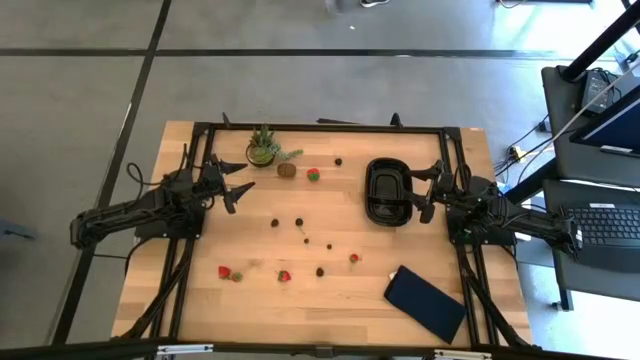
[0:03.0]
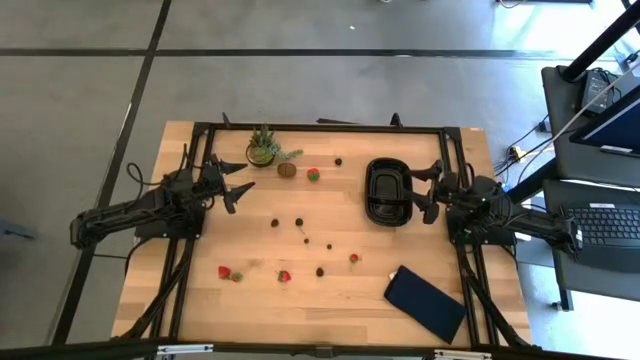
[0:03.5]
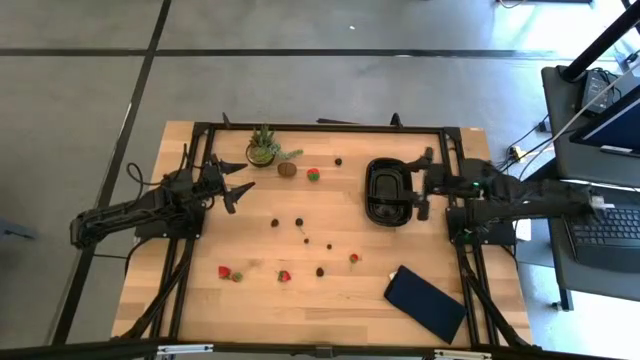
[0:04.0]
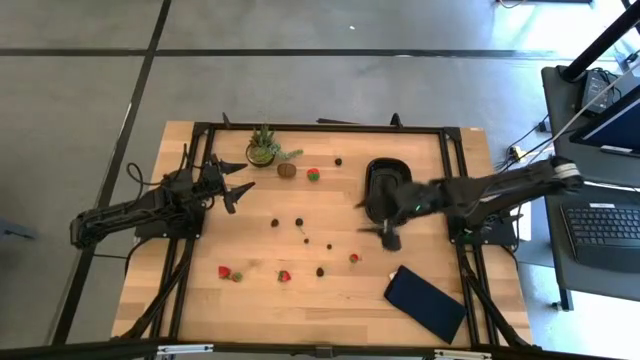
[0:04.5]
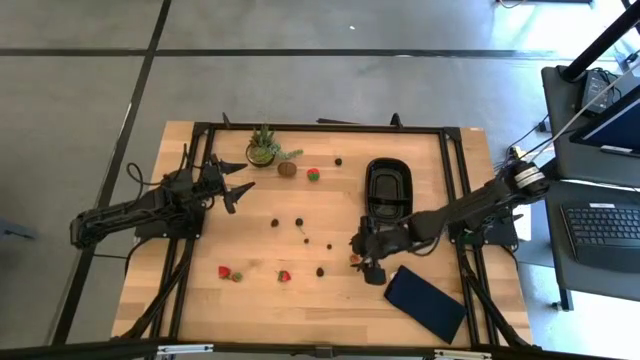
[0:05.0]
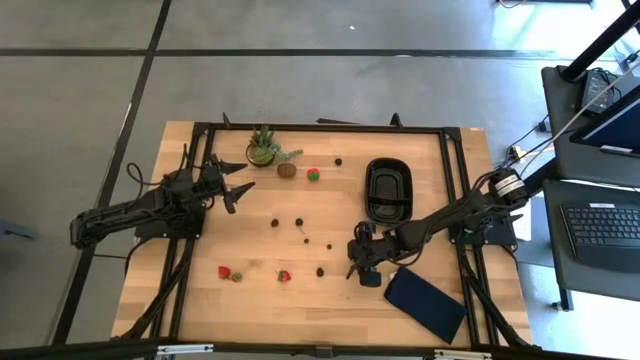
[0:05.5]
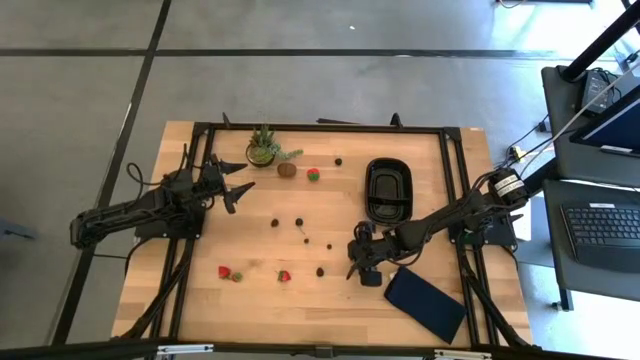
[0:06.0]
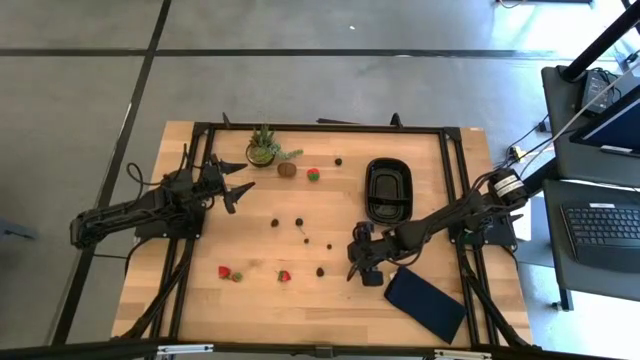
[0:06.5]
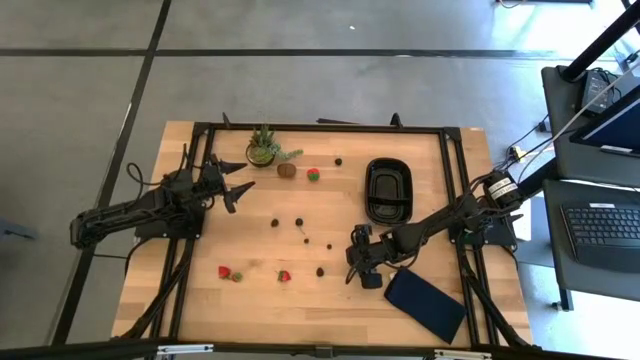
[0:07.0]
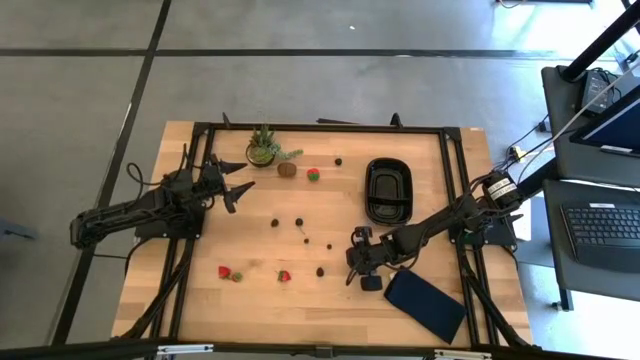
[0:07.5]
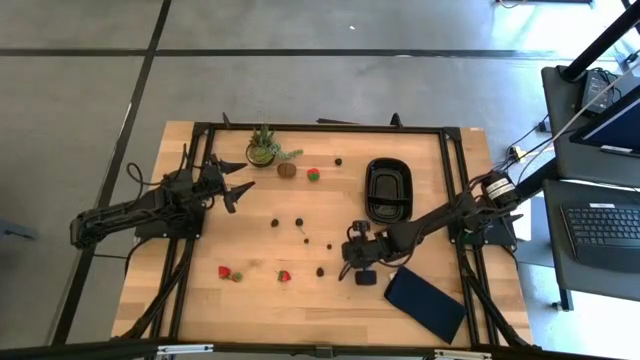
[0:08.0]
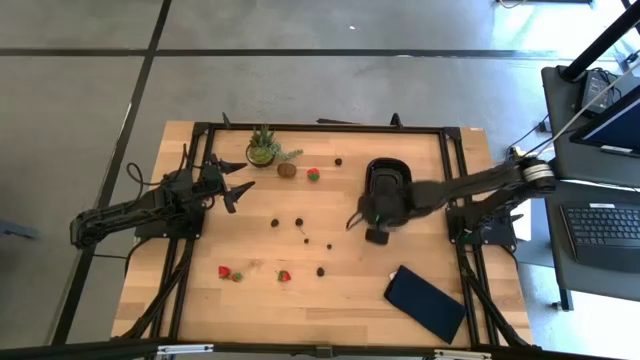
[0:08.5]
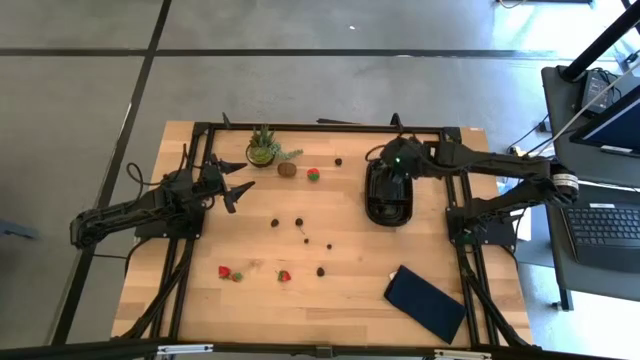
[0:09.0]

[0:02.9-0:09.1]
Task: Pick and placing Produce into tupperware
Put the red strawberry into the black bin

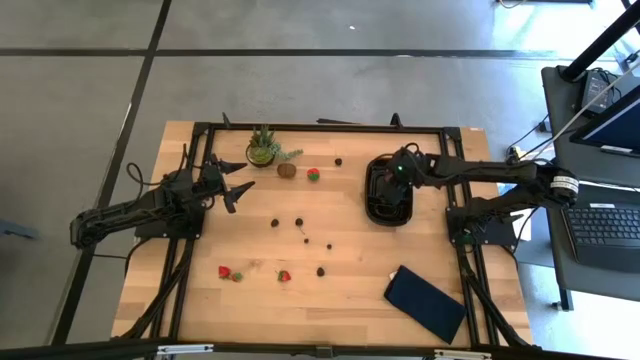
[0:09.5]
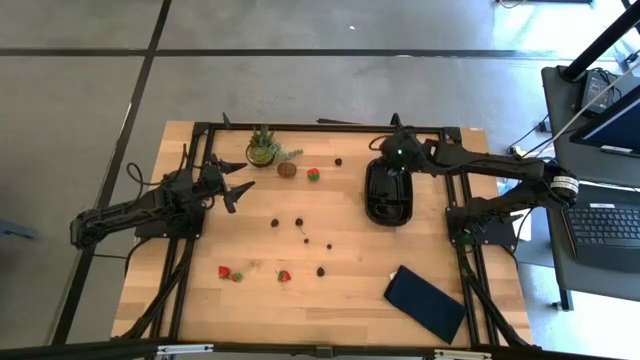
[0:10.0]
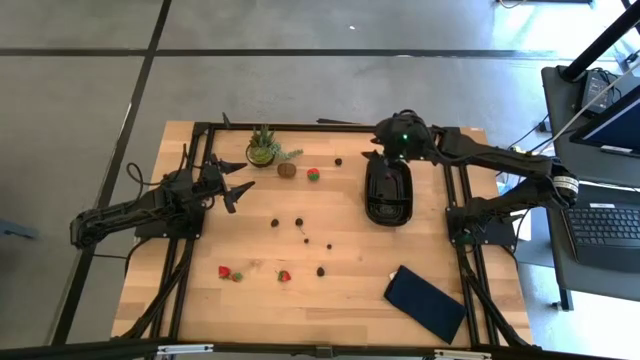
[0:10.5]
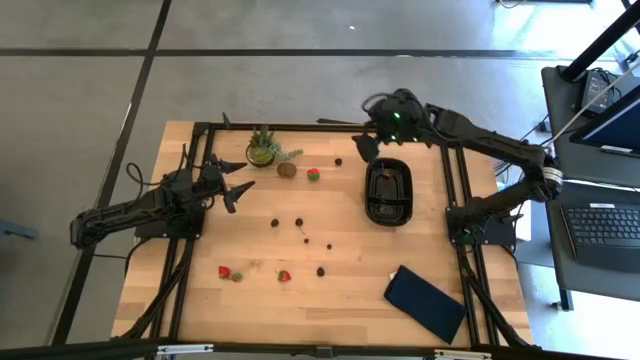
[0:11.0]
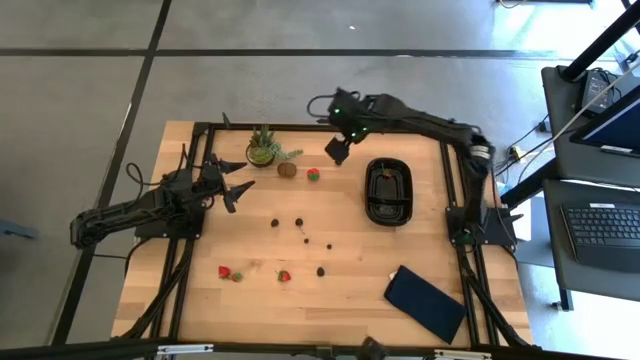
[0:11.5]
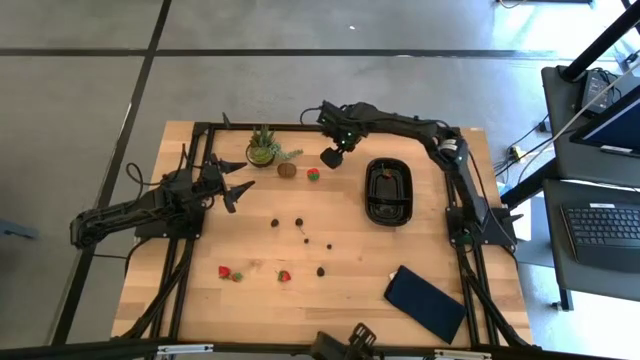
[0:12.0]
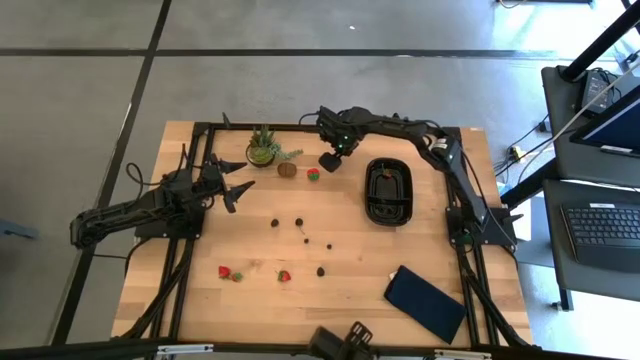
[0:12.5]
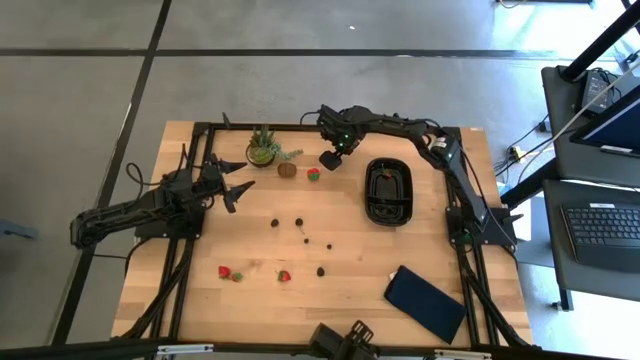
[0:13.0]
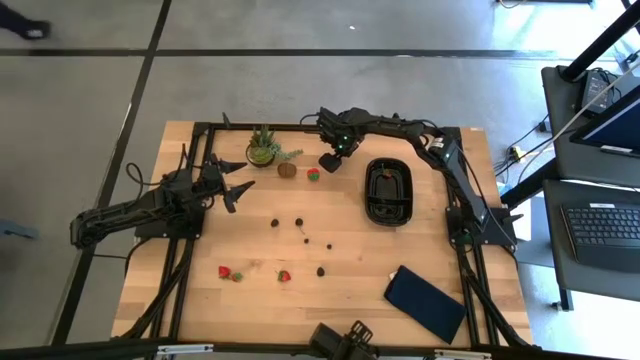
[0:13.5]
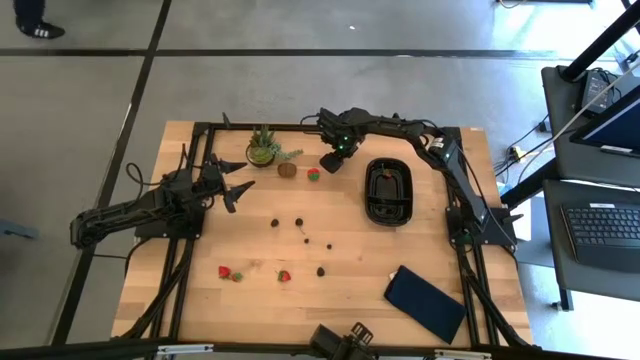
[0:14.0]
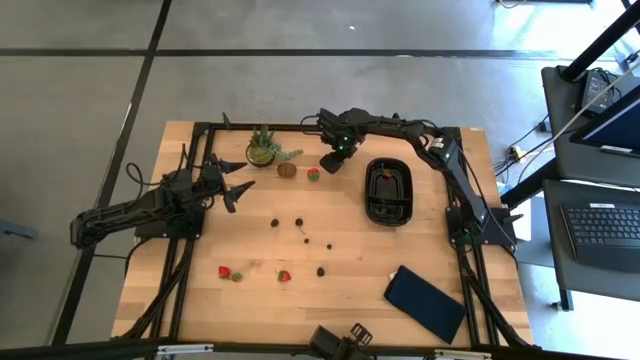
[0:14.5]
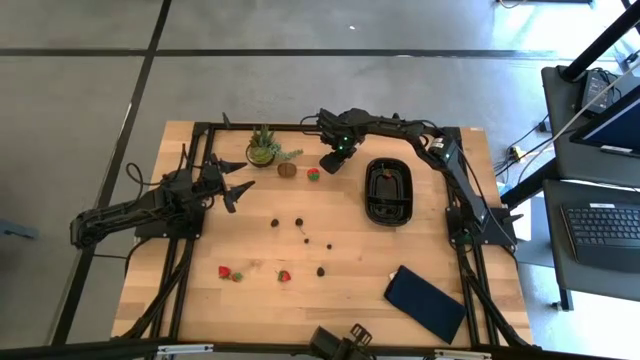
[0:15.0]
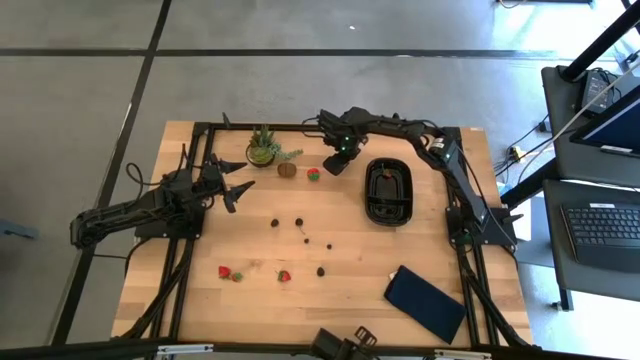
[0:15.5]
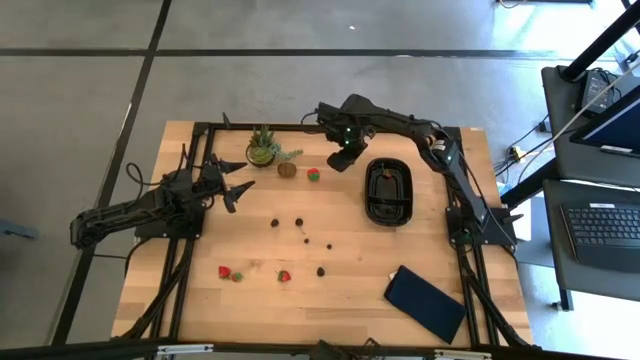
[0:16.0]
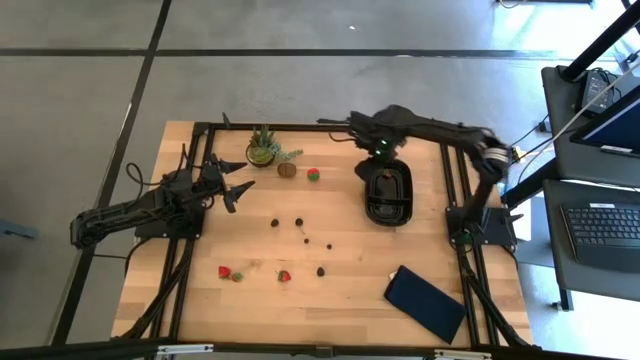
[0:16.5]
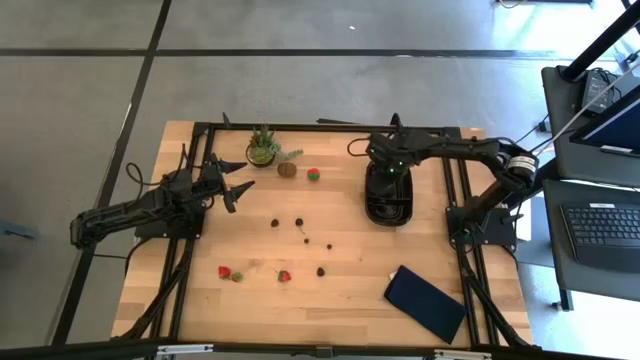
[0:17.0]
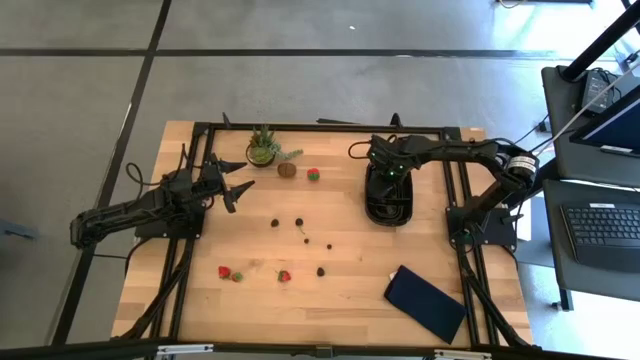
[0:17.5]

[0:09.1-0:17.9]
Put the black cherry into the black bin

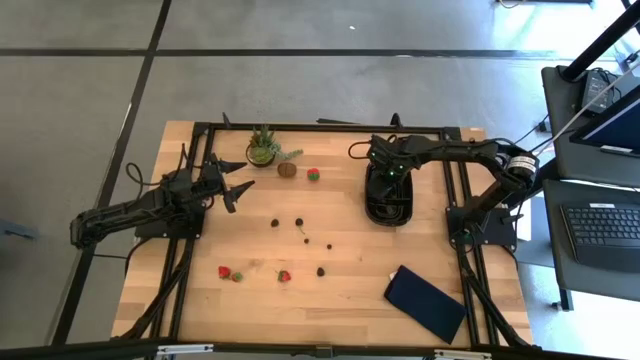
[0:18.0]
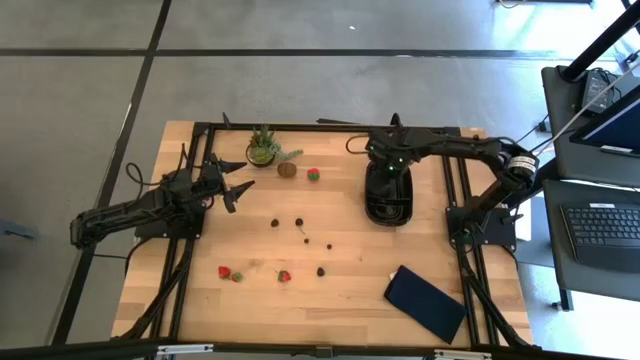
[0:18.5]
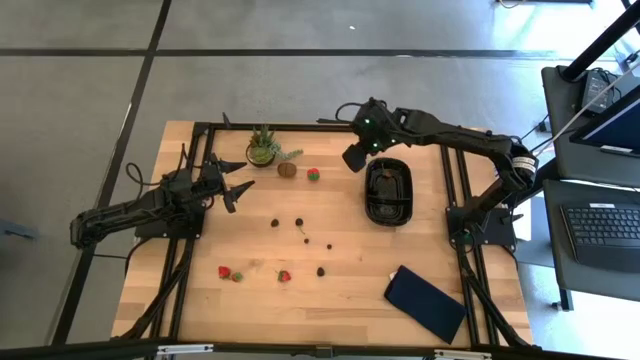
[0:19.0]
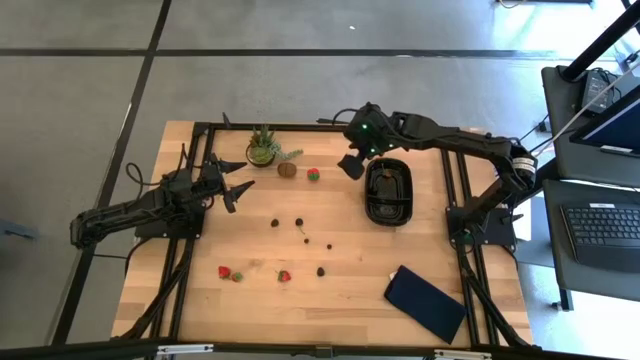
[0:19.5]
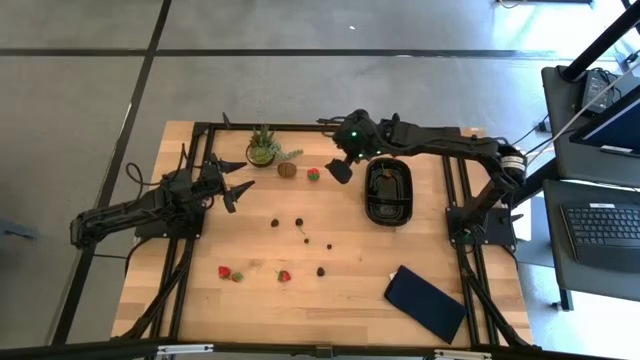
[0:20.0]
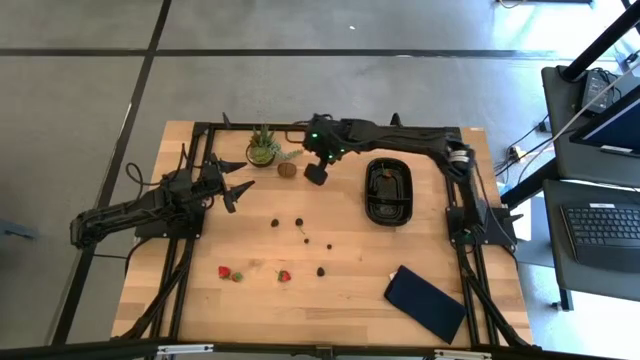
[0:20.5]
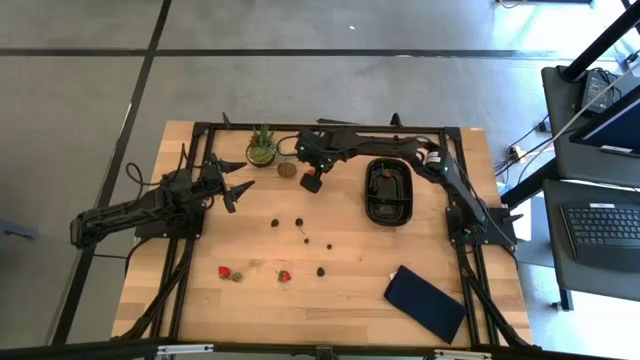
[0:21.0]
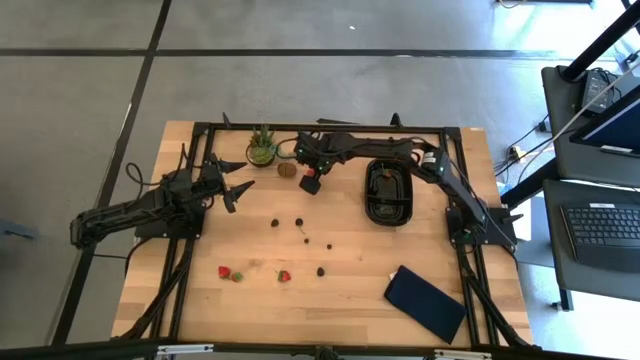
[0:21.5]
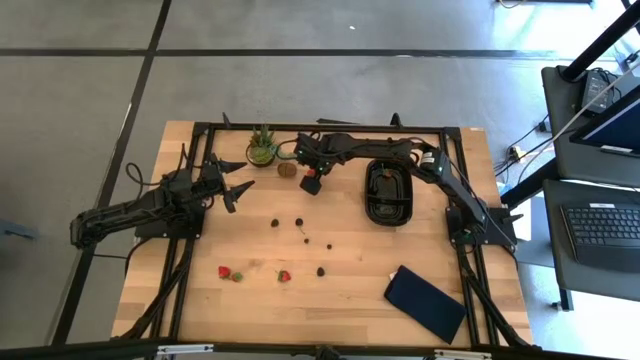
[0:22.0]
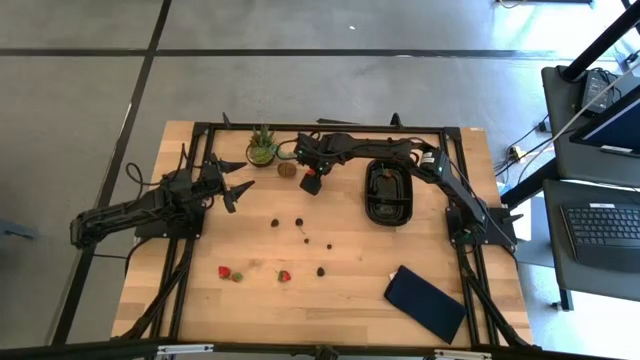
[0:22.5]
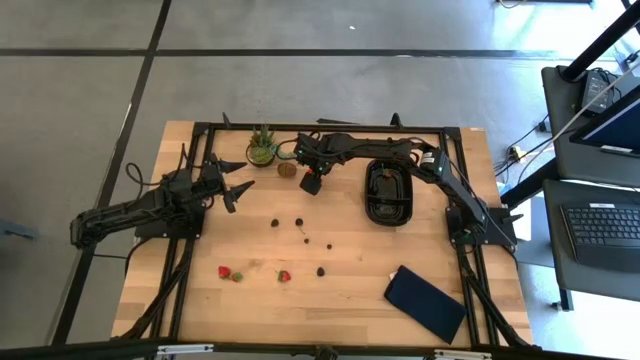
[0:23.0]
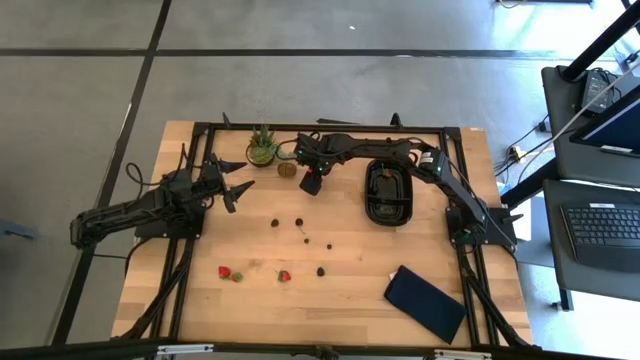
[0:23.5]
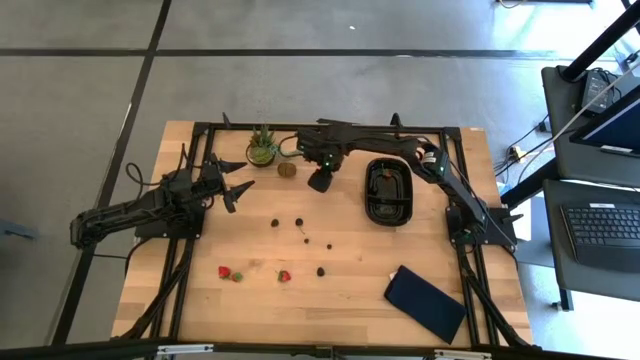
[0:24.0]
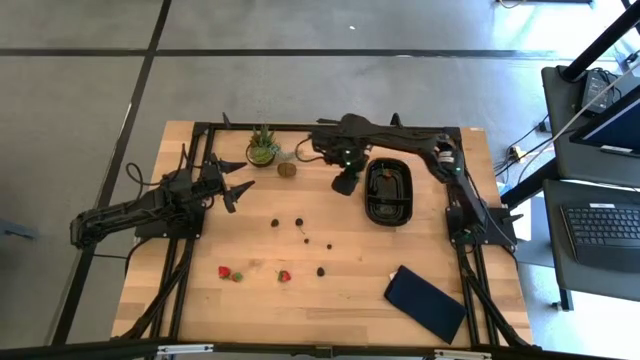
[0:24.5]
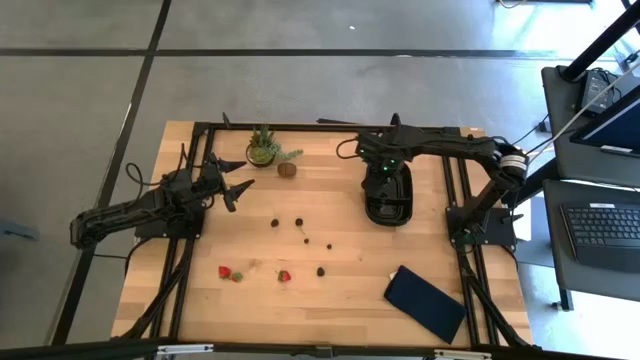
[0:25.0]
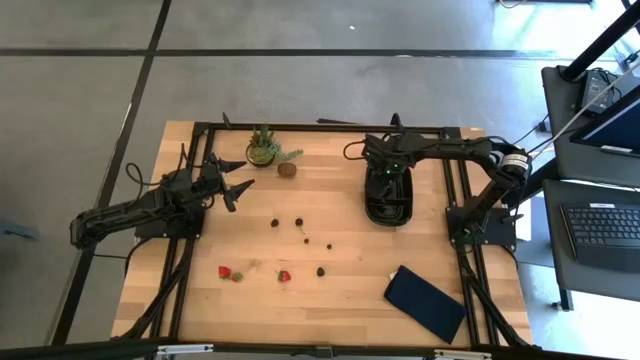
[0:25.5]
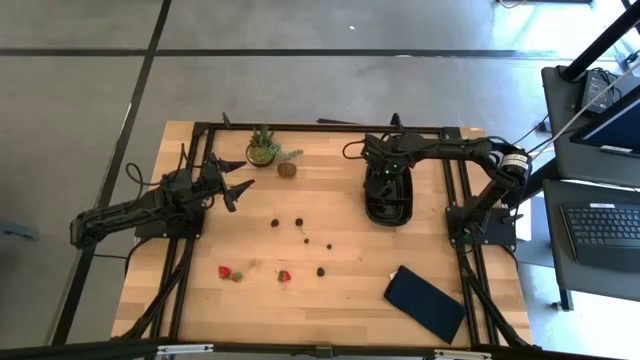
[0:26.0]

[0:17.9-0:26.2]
Put the red strawberry into the black bin
